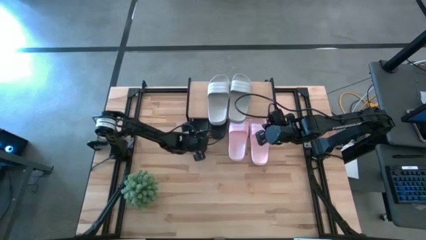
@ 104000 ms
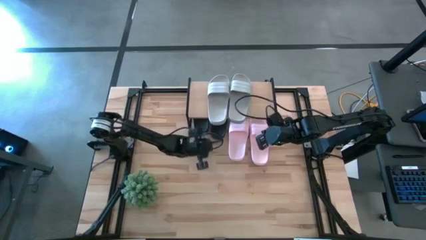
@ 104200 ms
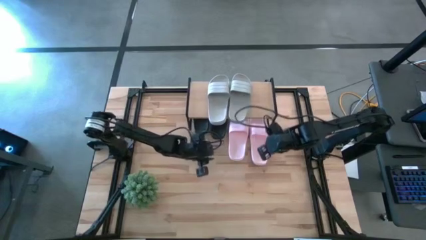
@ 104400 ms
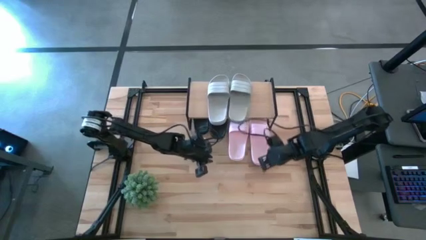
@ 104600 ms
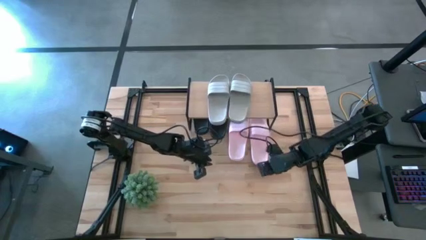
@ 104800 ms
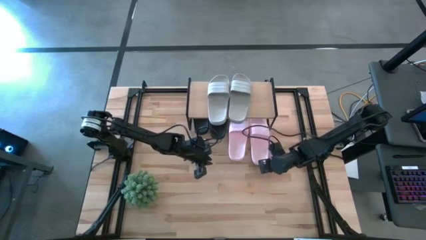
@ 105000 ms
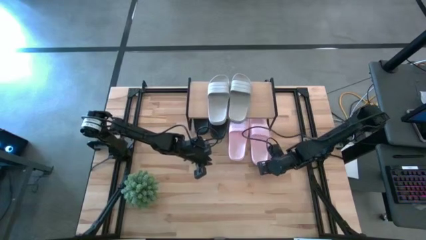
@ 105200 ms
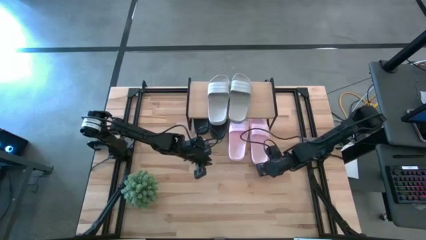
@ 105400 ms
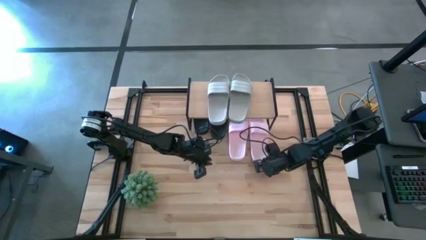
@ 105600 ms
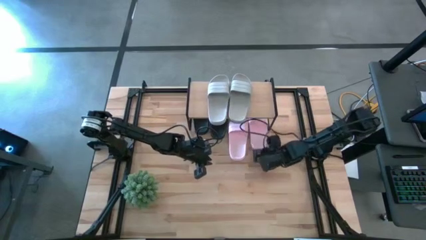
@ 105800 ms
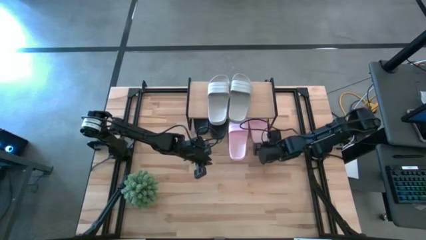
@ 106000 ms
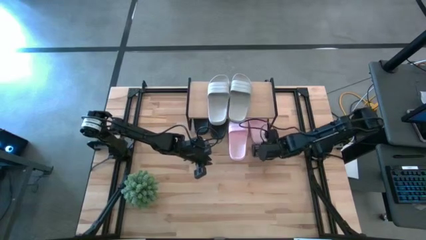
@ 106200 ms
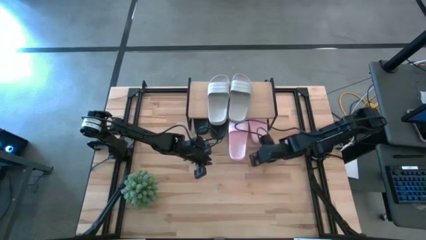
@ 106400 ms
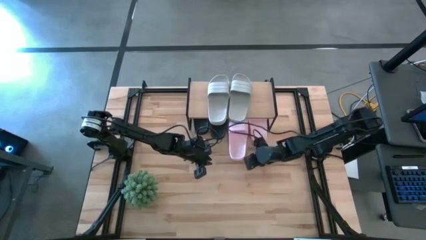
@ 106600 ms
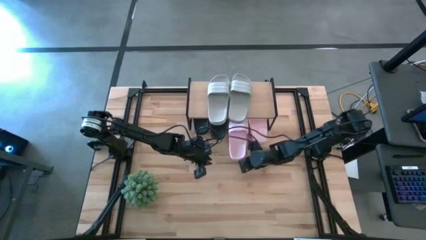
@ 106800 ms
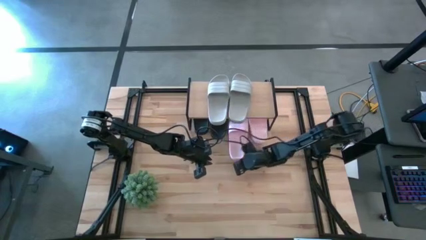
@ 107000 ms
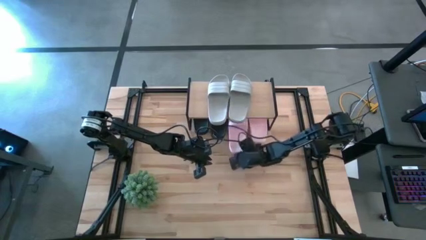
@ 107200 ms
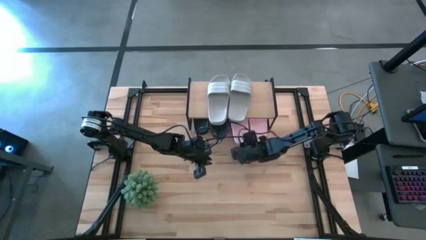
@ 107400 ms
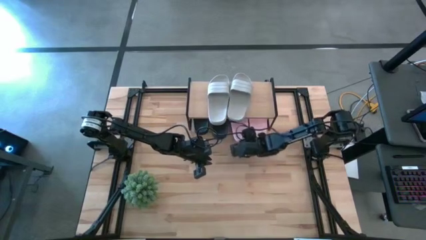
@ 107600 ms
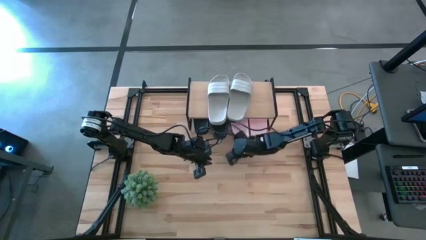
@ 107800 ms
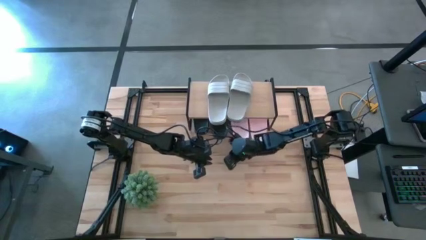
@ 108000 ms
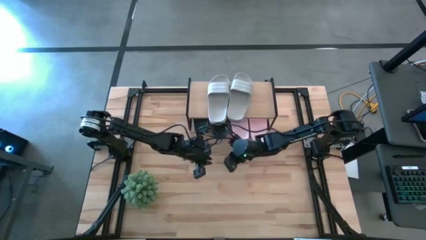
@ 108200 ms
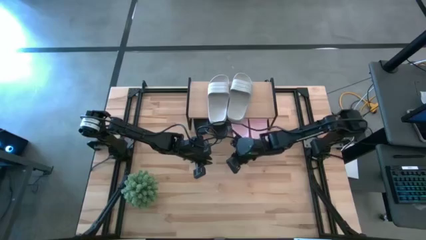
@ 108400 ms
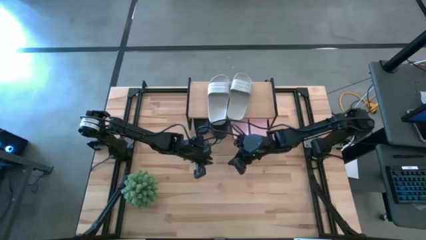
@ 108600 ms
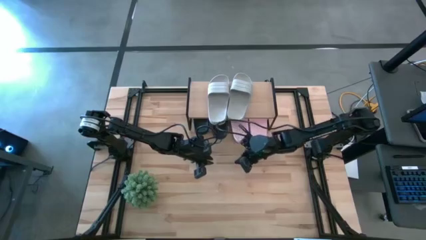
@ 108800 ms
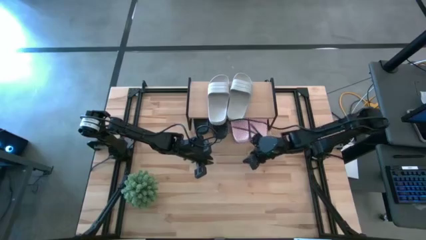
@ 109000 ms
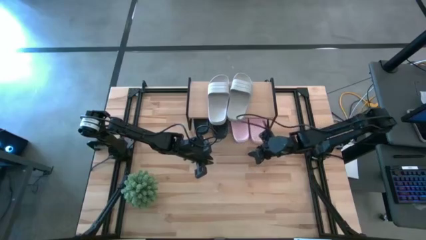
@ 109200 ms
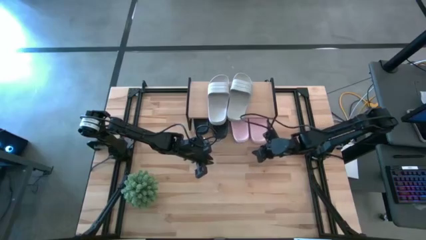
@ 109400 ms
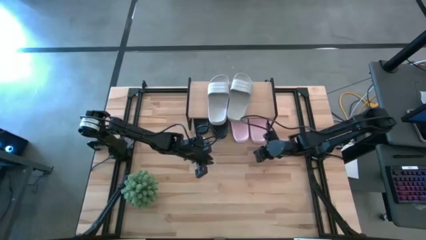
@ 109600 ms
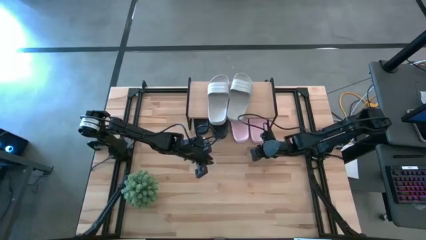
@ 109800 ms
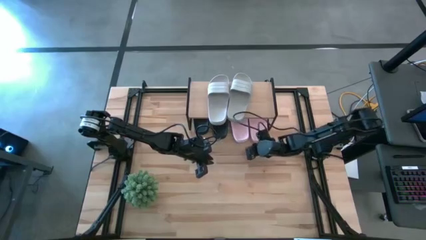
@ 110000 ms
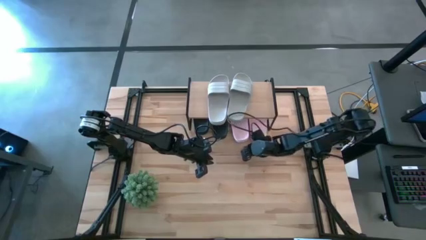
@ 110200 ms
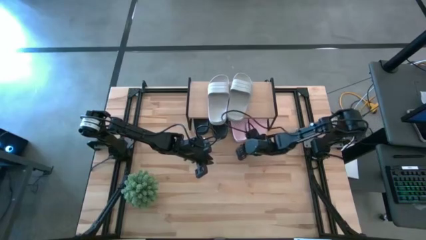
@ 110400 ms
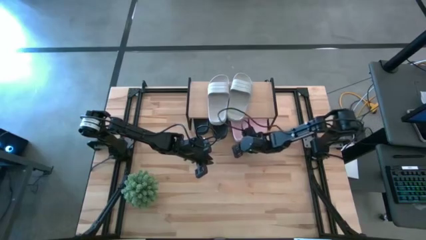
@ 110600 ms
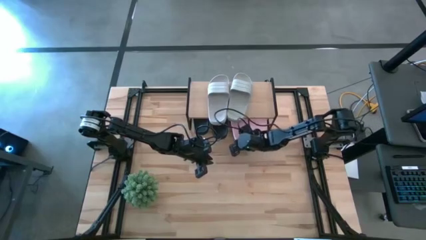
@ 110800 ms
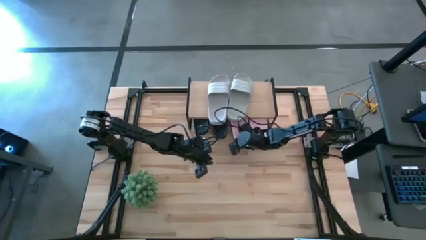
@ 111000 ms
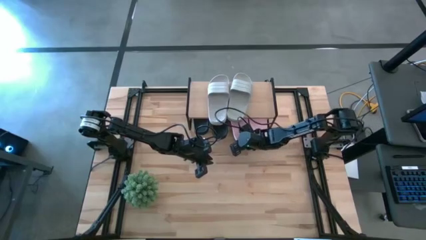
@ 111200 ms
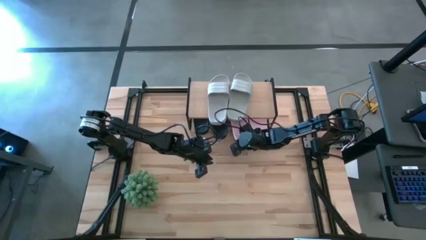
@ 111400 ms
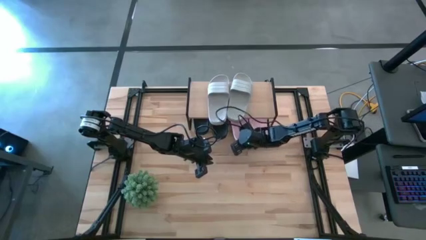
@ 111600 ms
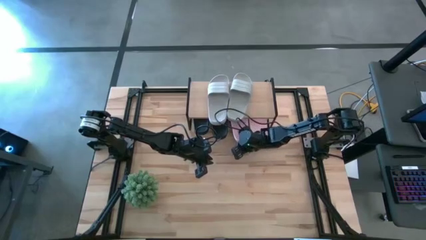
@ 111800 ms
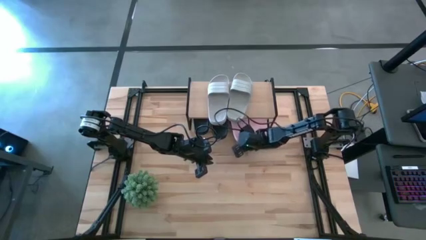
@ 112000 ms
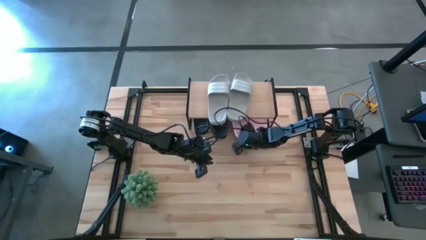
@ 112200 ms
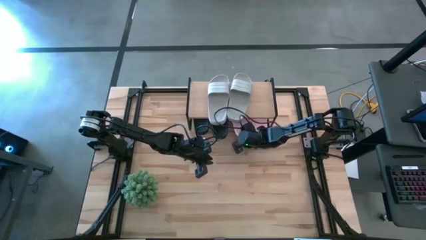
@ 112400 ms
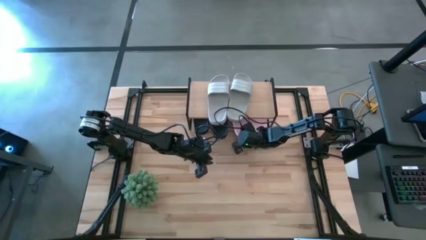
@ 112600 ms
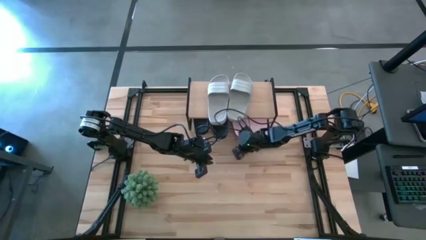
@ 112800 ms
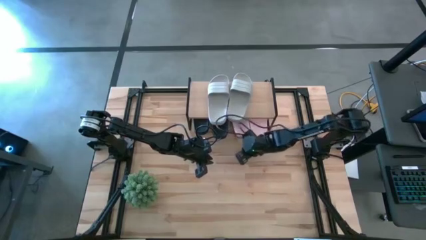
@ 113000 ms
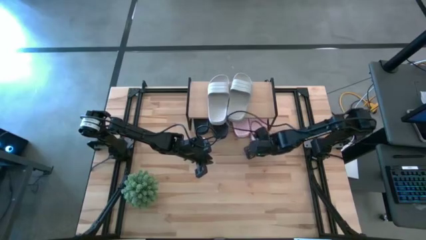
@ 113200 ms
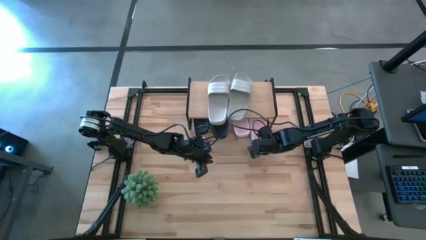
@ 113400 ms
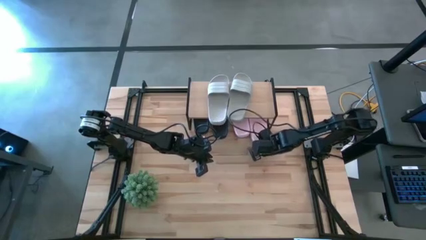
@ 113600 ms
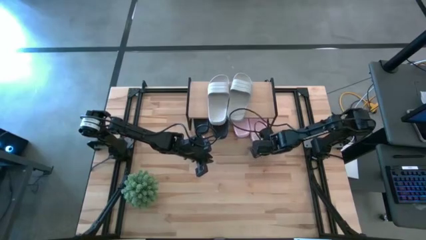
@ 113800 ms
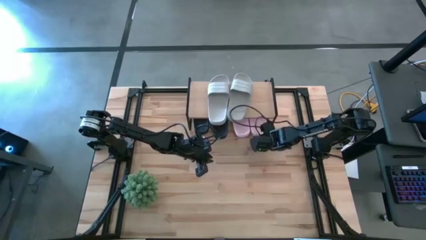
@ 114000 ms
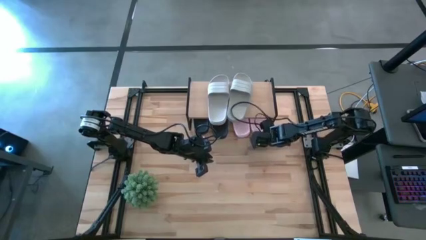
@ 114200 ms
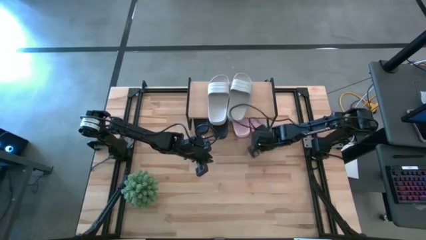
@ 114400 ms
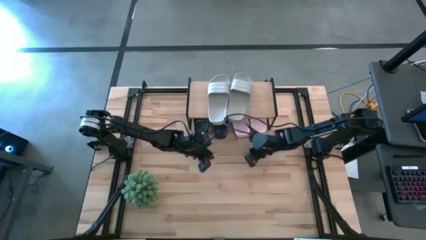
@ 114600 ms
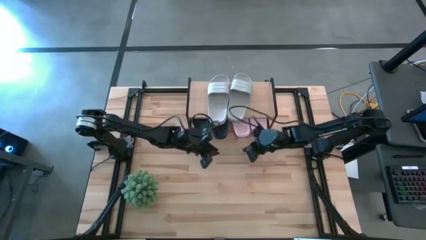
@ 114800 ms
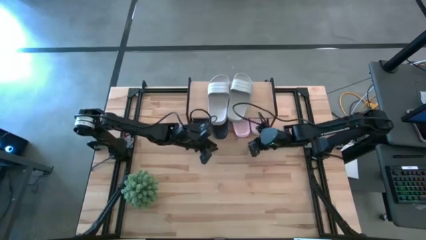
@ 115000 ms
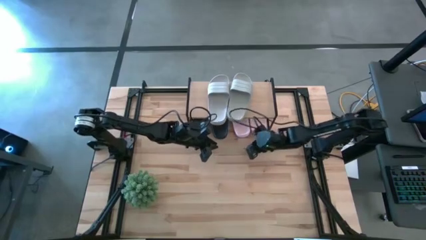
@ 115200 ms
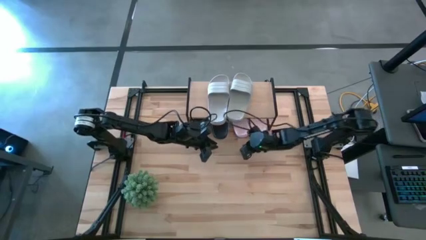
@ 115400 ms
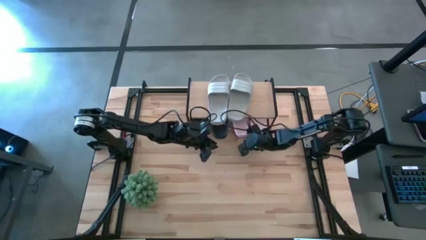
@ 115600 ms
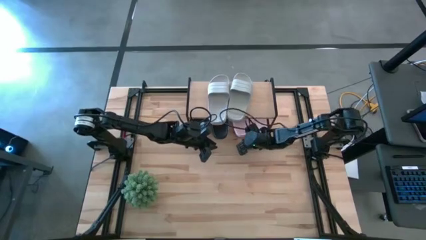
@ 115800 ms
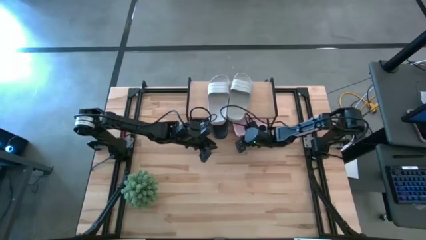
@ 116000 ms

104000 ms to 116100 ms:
Task: Pick and place slides into the shelf
Adjust the pink slides under the shelf
